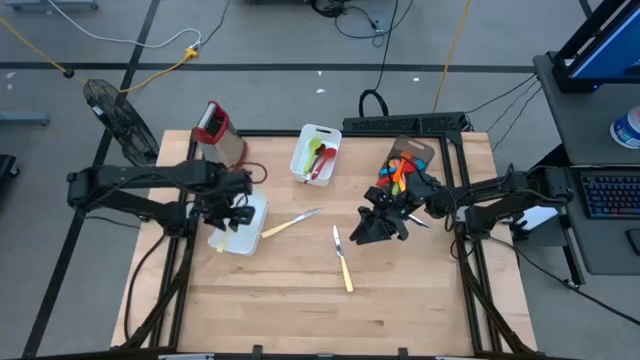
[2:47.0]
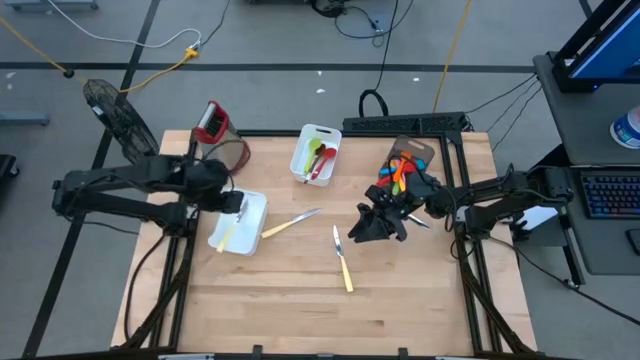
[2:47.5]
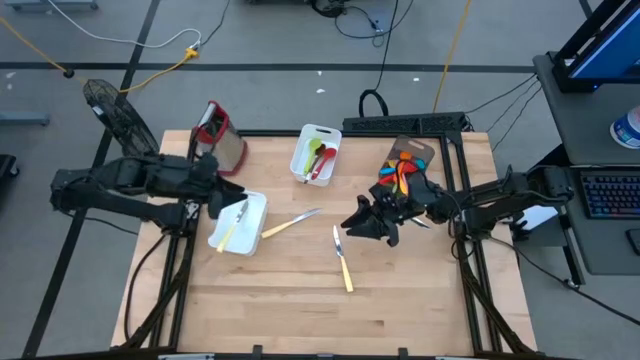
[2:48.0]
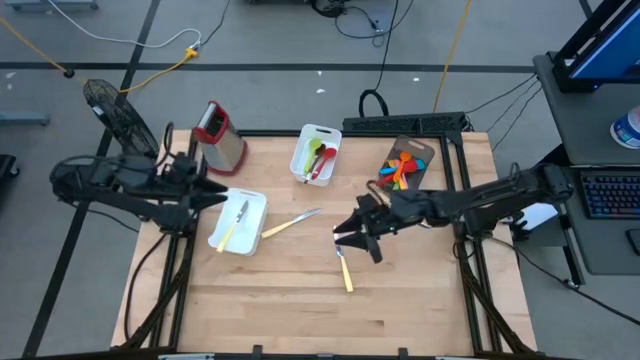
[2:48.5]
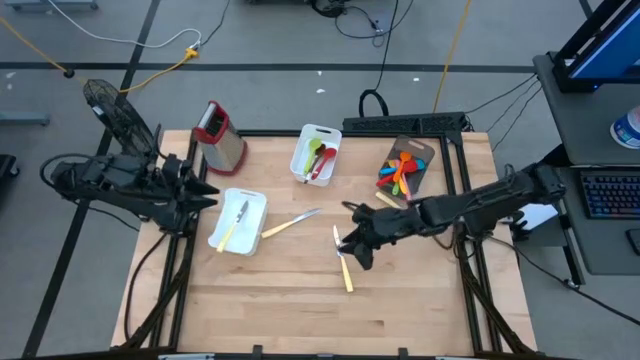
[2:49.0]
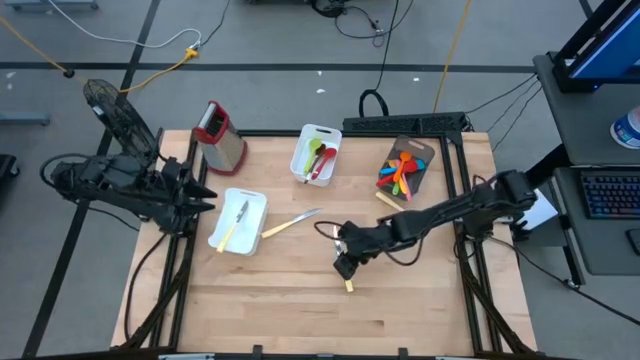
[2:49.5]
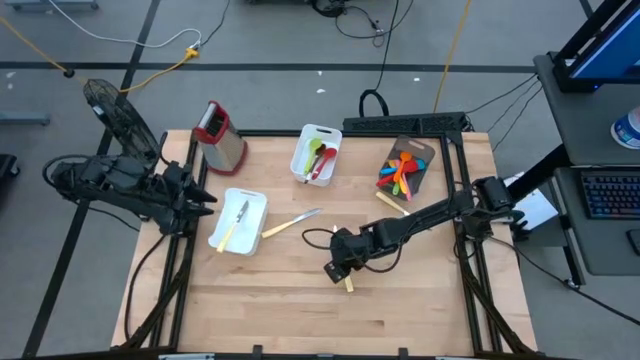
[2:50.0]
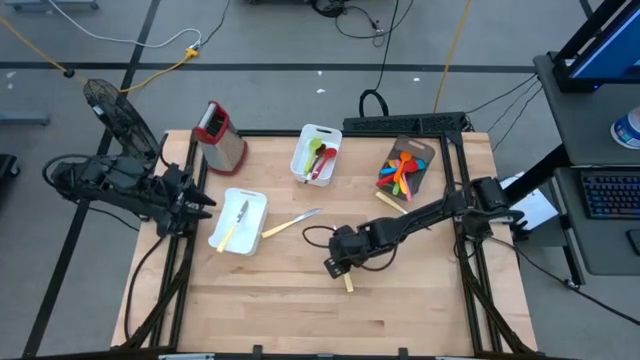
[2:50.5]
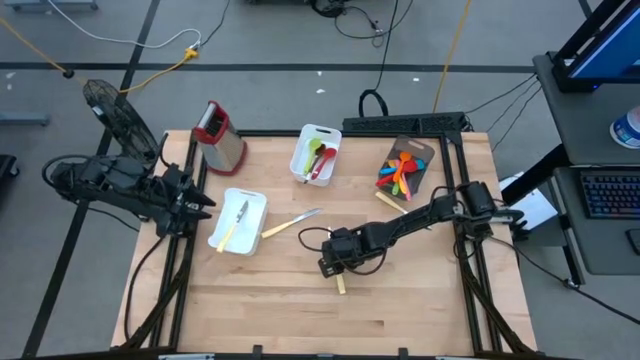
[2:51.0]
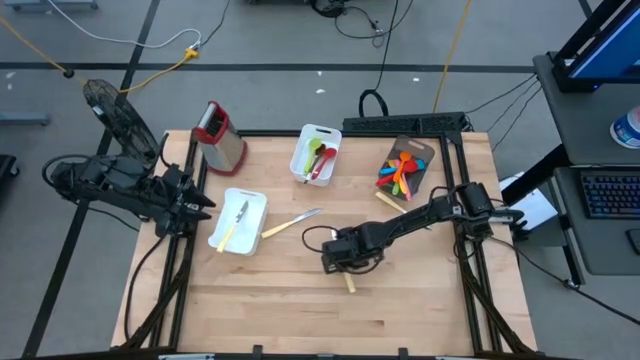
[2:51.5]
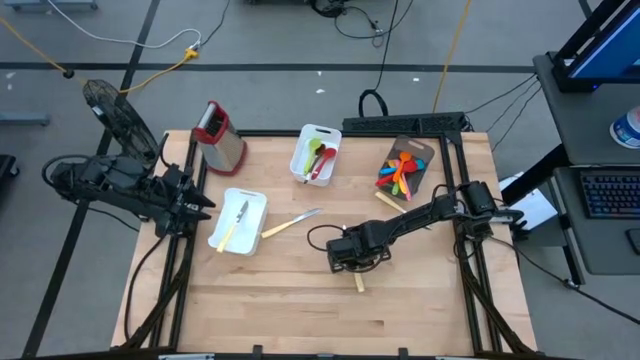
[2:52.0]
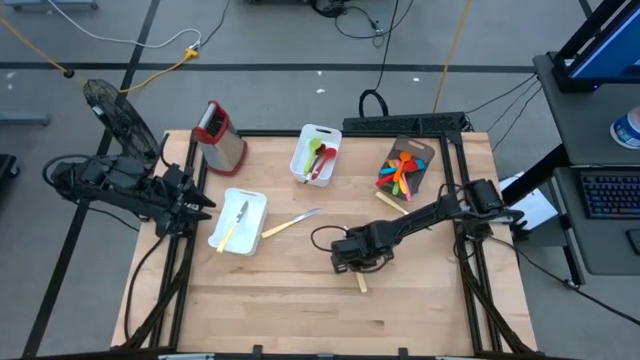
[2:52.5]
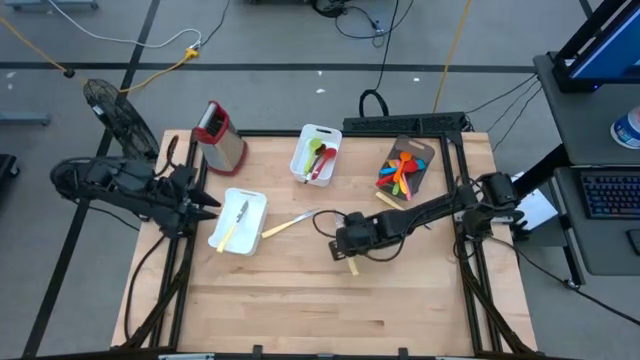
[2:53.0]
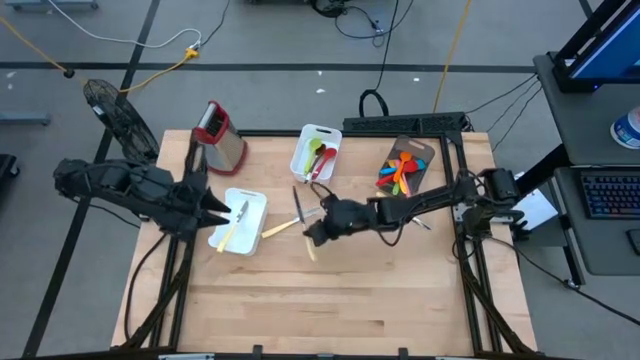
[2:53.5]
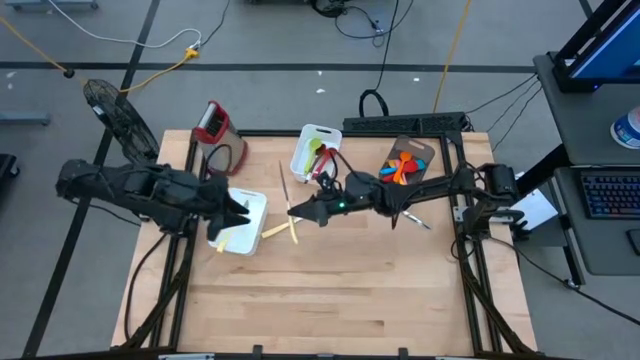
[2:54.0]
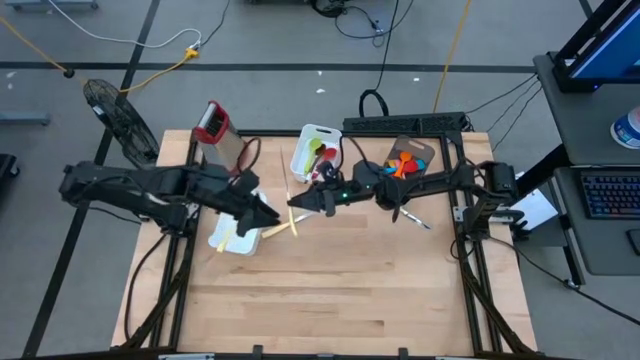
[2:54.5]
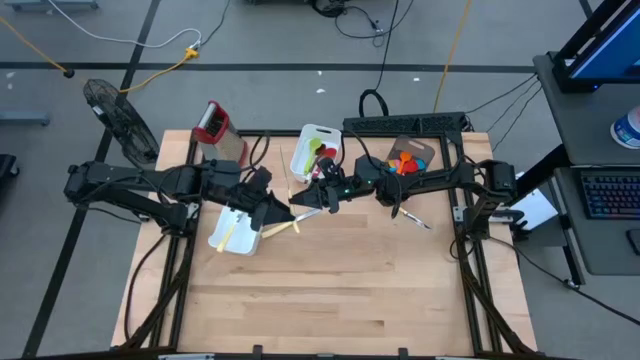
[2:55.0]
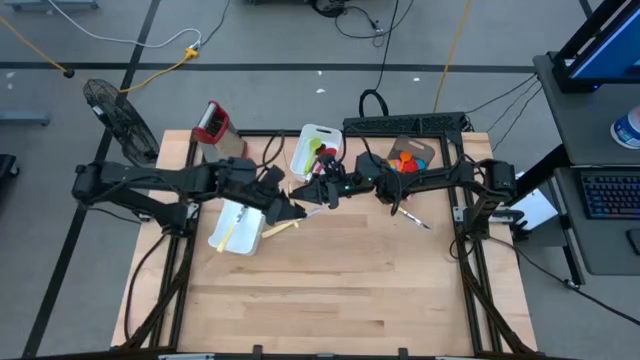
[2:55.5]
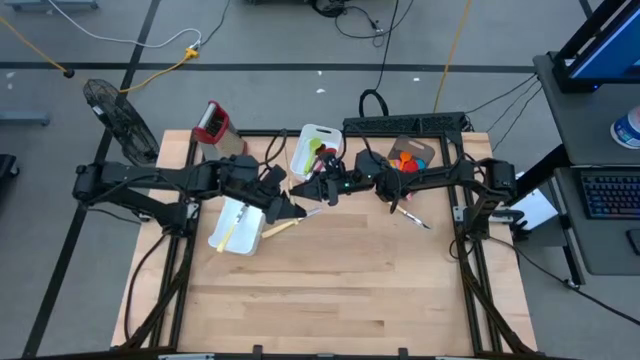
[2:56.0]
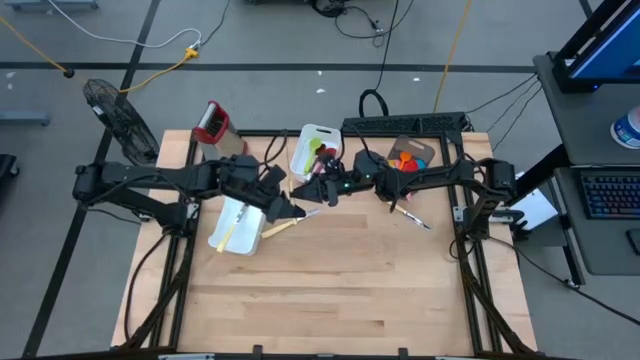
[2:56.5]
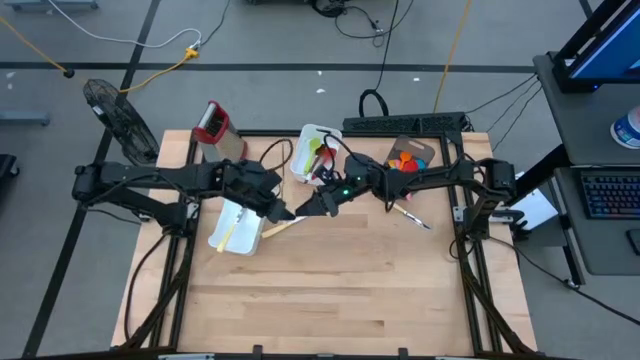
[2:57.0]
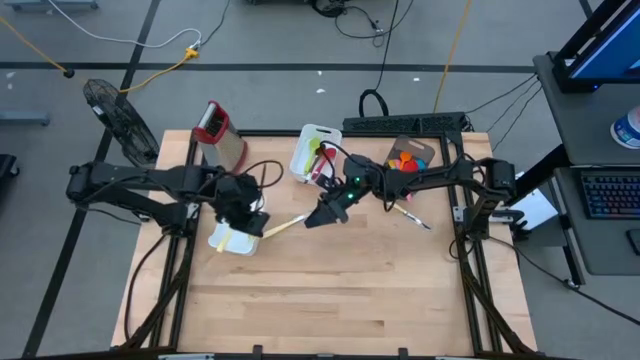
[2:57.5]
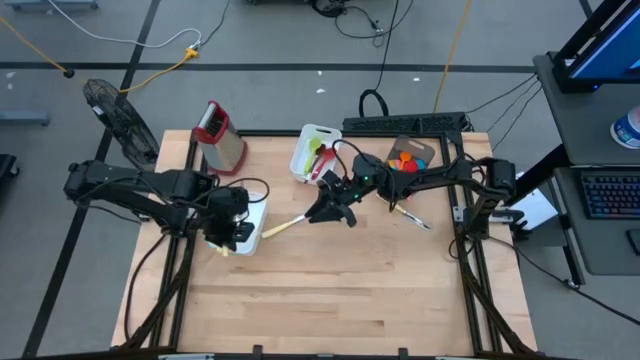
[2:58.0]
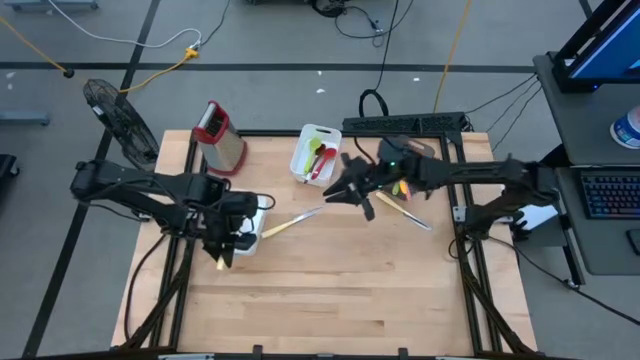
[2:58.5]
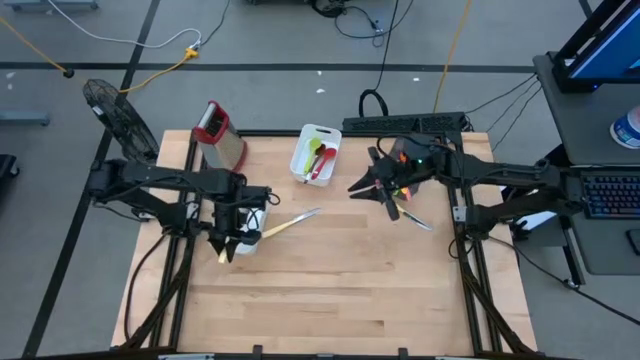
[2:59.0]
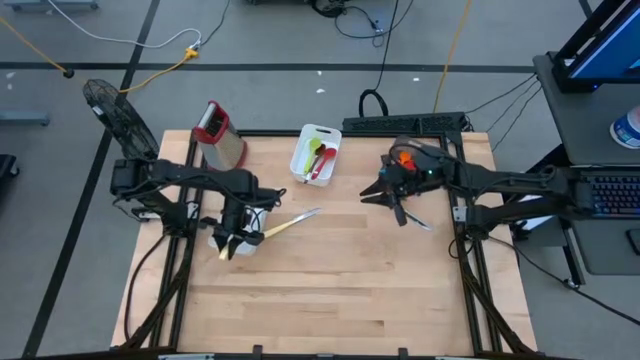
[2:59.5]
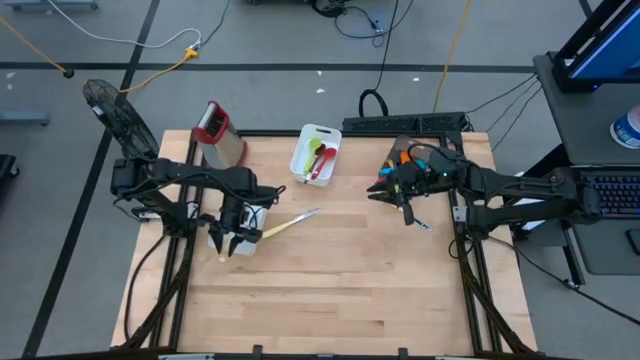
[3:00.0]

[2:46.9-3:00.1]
Task: Pick & Place Kitchen Items
Put the yellow knife into the bottom white bin

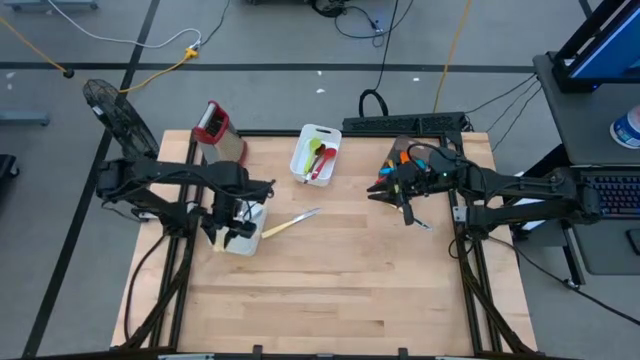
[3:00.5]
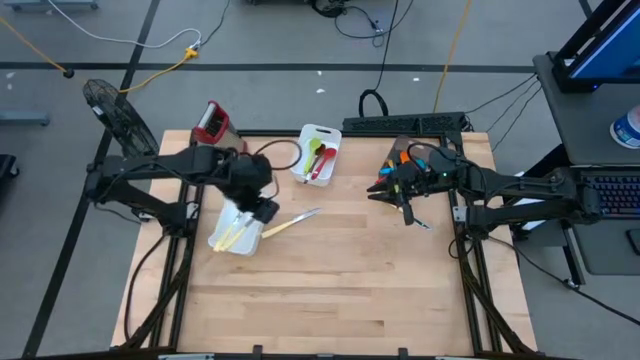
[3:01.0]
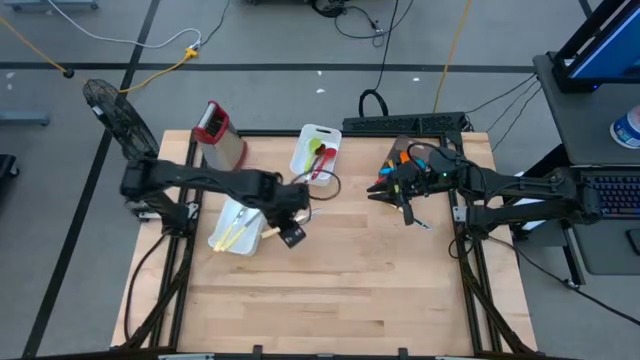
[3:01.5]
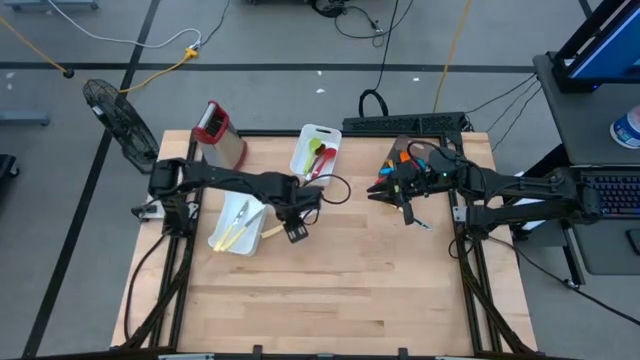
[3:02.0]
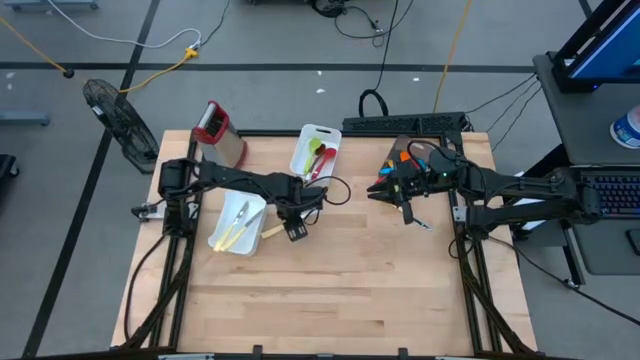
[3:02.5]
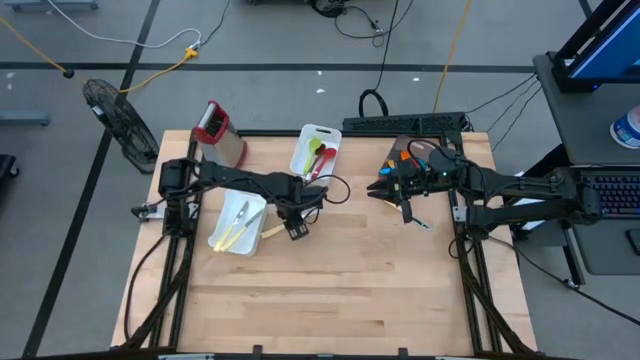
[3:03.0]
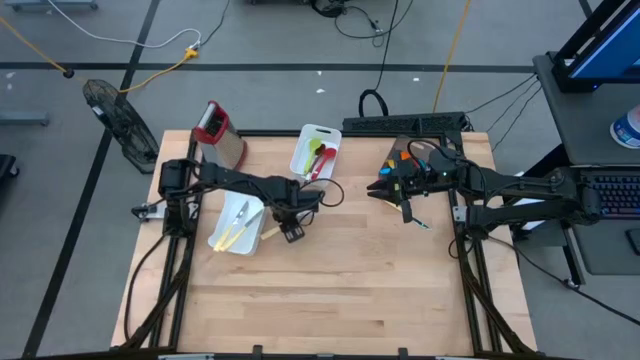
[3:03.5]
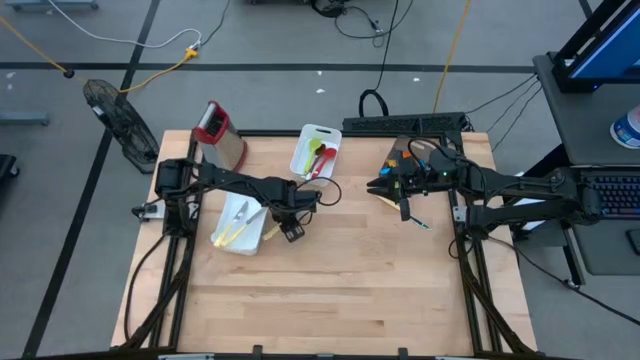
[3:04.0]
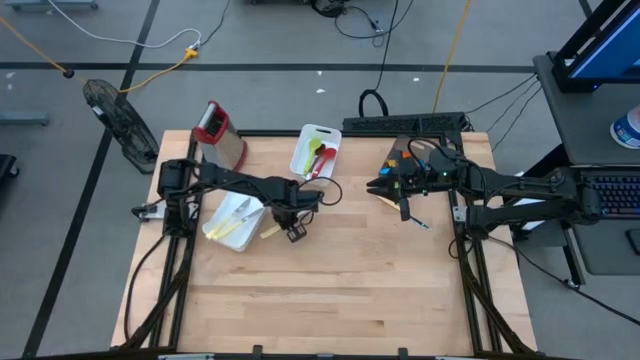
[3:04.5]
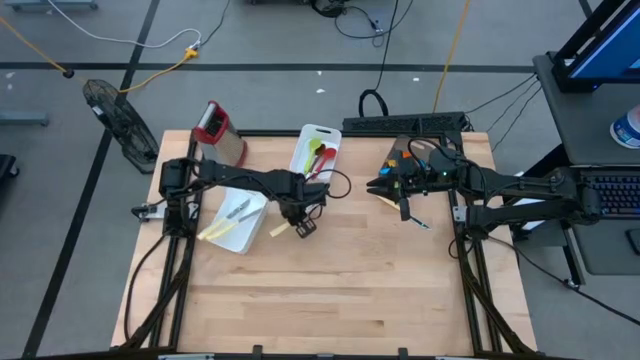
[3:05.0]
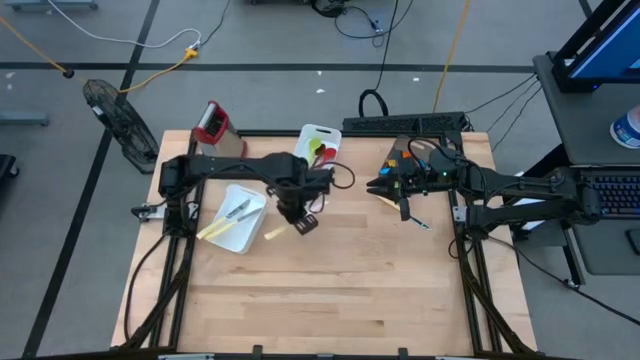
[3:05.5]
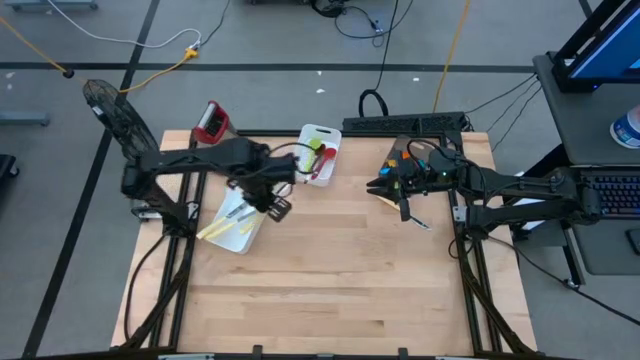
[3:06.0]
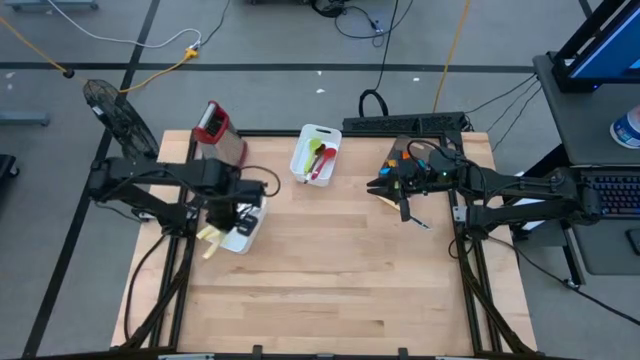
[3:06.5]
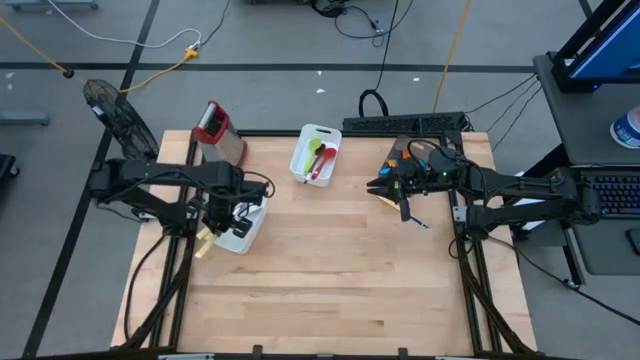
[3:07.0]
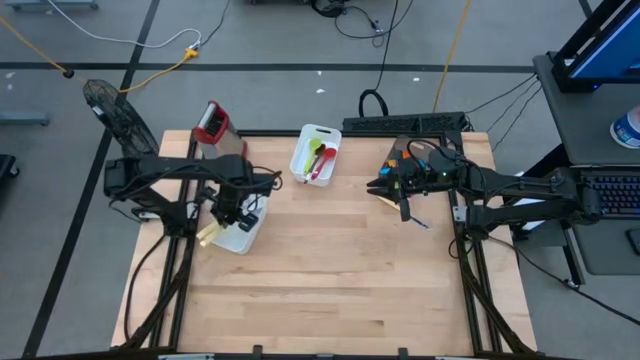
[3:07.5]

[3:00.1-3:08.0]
Put the yellow knife into the bottom white bin
